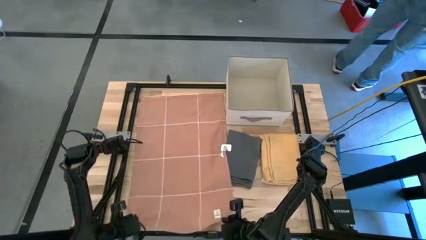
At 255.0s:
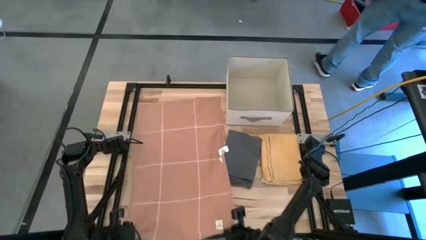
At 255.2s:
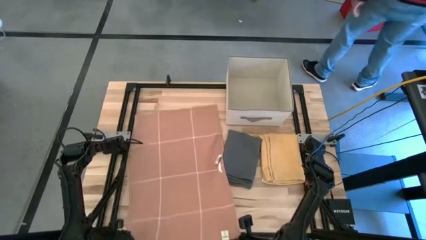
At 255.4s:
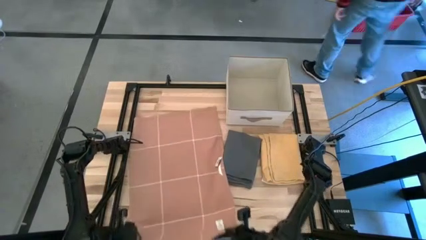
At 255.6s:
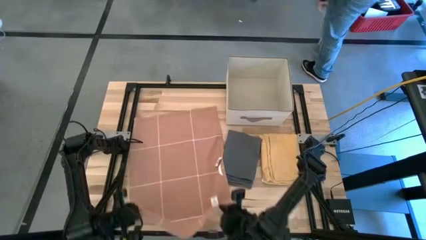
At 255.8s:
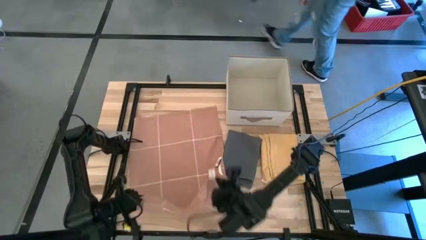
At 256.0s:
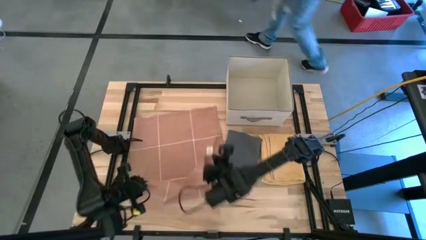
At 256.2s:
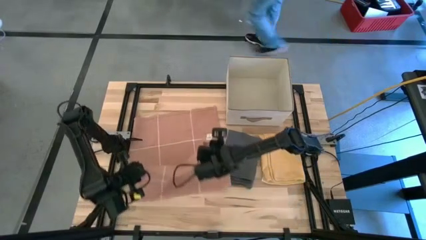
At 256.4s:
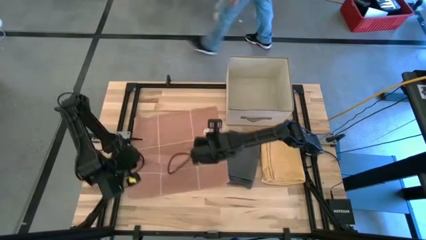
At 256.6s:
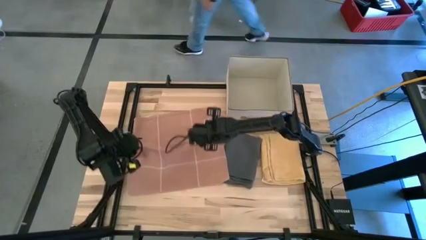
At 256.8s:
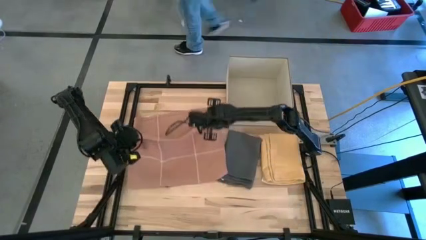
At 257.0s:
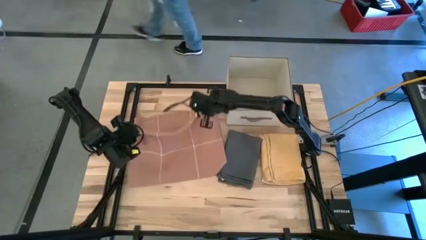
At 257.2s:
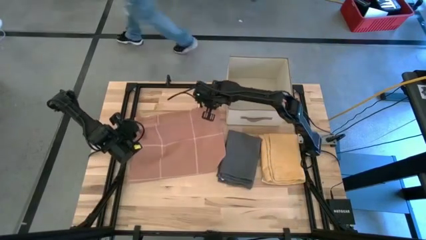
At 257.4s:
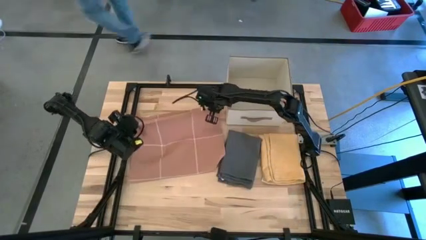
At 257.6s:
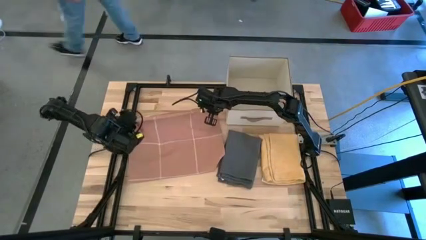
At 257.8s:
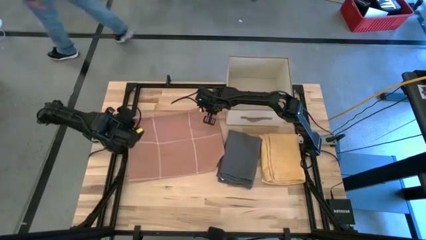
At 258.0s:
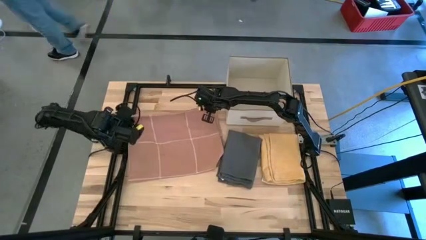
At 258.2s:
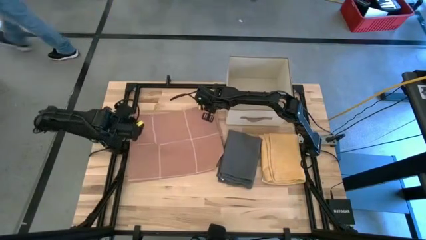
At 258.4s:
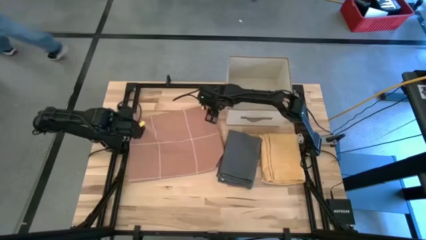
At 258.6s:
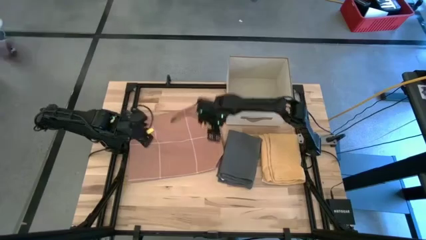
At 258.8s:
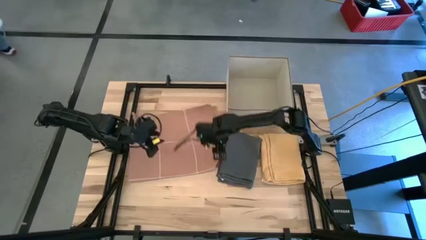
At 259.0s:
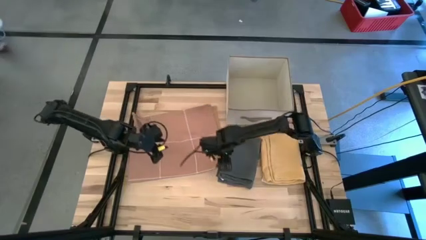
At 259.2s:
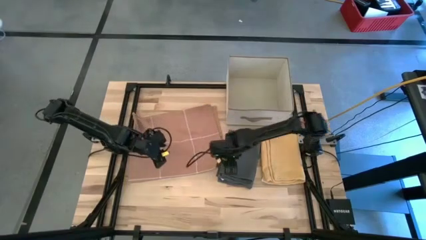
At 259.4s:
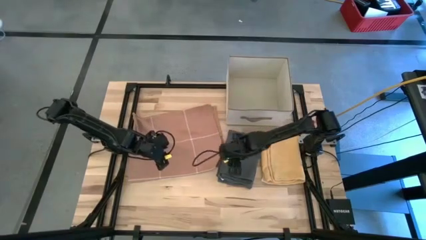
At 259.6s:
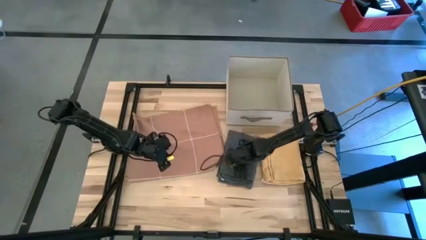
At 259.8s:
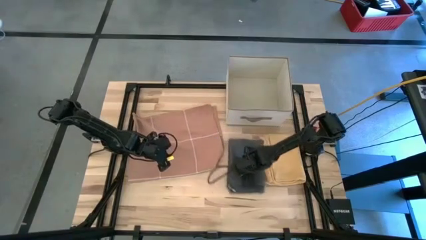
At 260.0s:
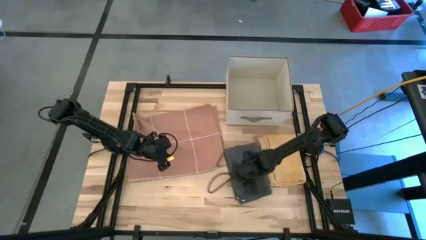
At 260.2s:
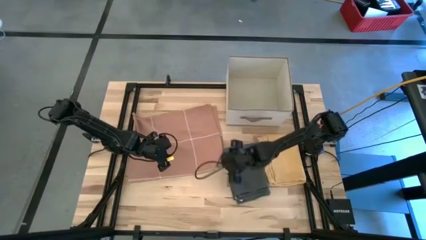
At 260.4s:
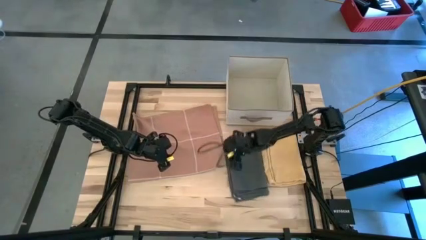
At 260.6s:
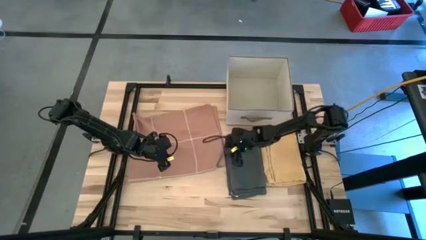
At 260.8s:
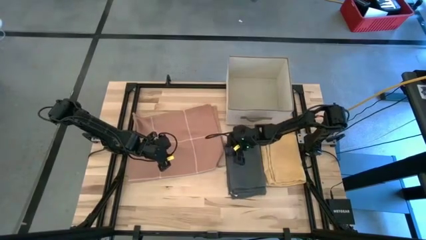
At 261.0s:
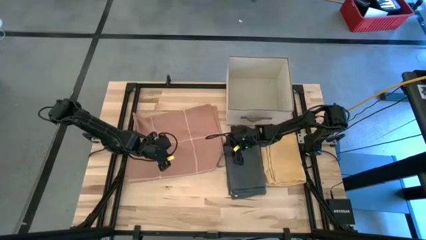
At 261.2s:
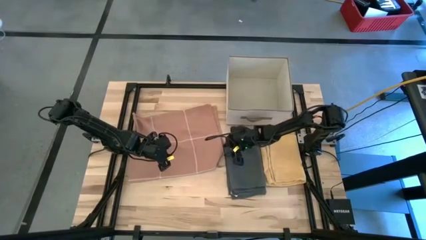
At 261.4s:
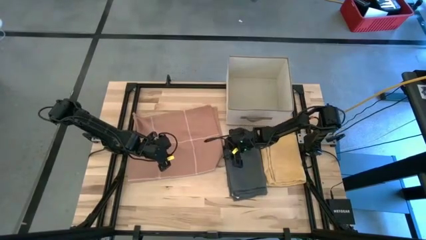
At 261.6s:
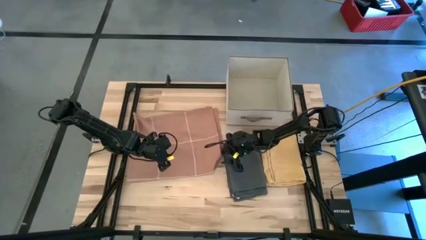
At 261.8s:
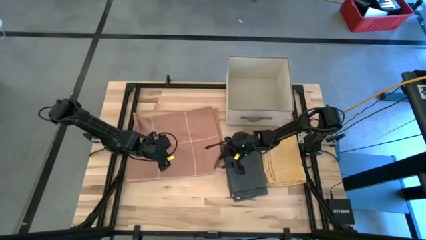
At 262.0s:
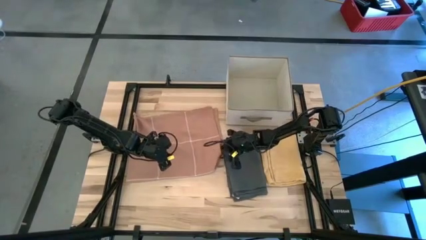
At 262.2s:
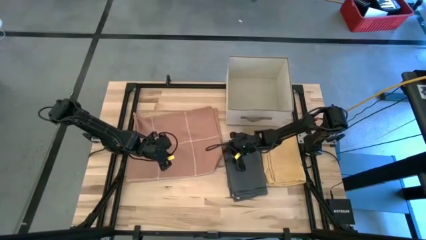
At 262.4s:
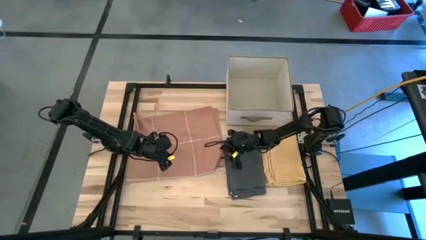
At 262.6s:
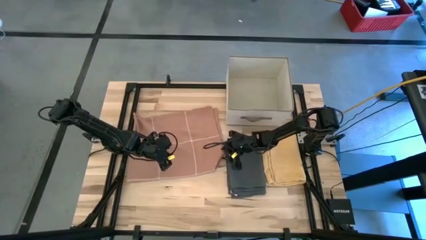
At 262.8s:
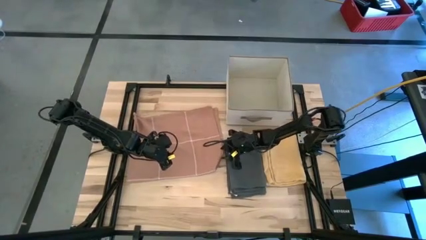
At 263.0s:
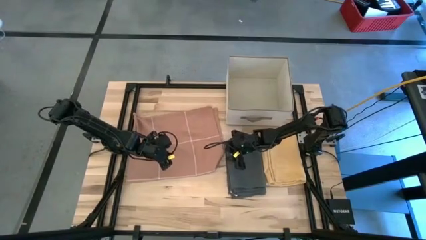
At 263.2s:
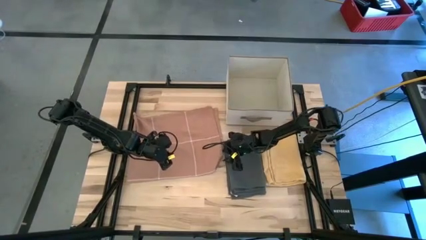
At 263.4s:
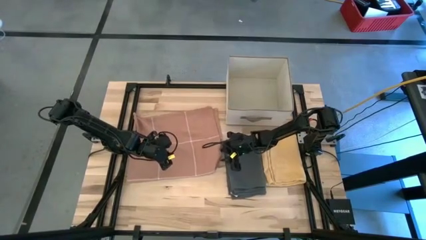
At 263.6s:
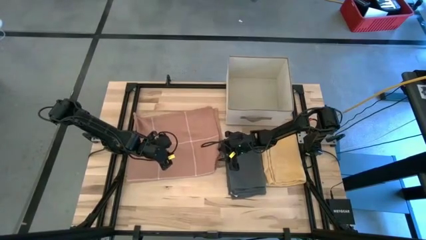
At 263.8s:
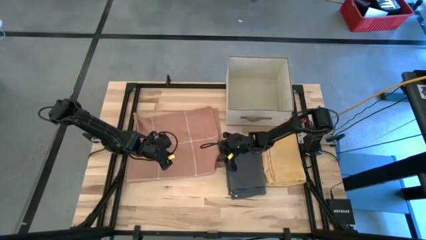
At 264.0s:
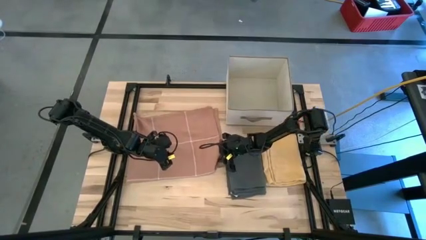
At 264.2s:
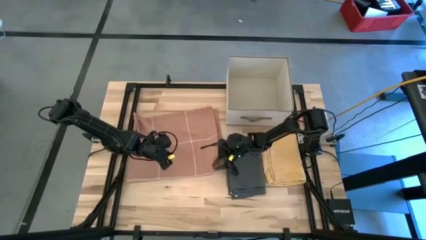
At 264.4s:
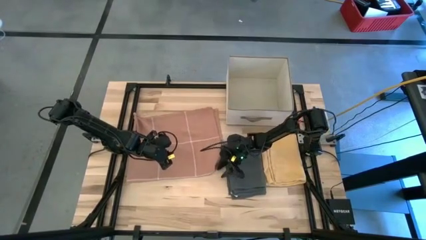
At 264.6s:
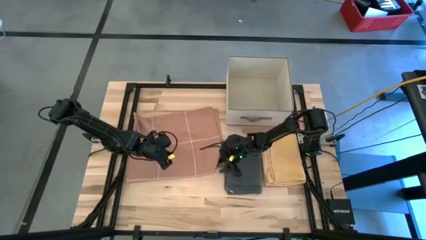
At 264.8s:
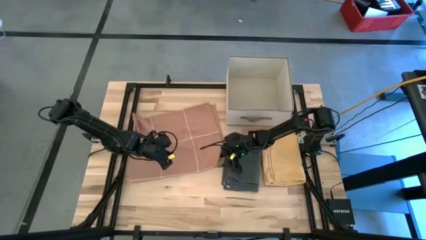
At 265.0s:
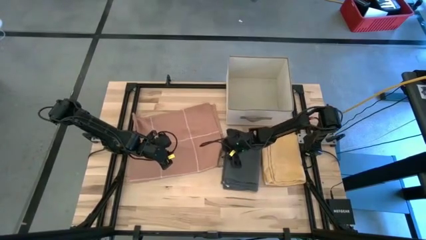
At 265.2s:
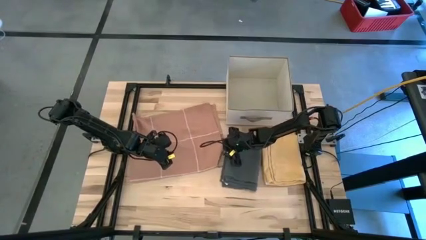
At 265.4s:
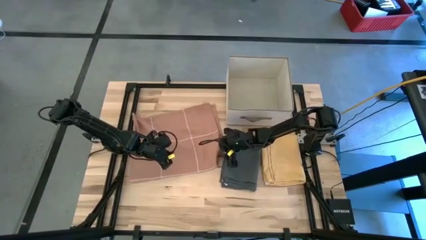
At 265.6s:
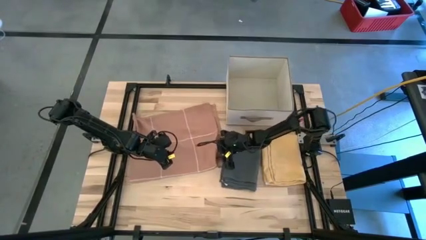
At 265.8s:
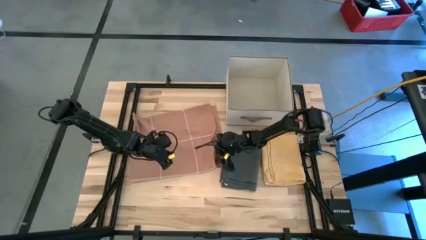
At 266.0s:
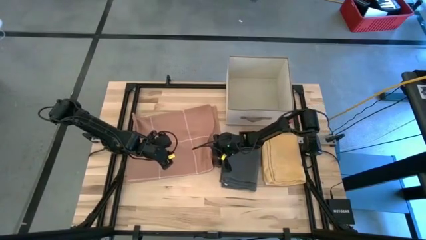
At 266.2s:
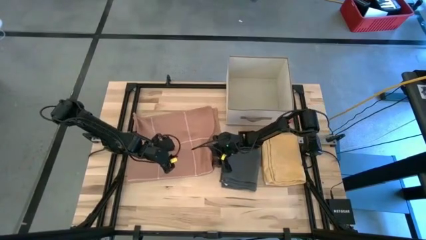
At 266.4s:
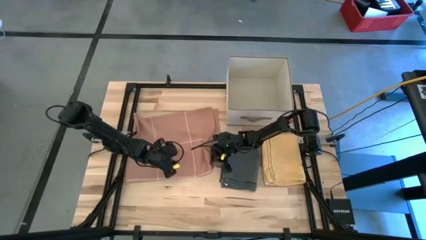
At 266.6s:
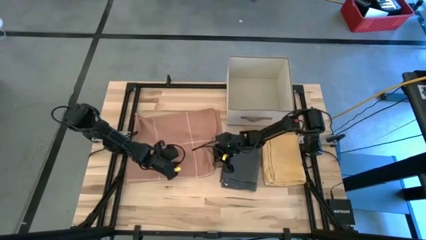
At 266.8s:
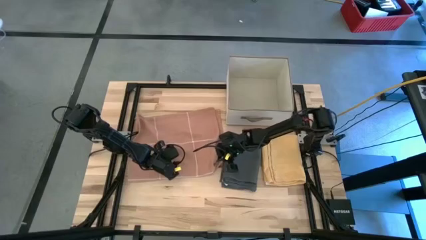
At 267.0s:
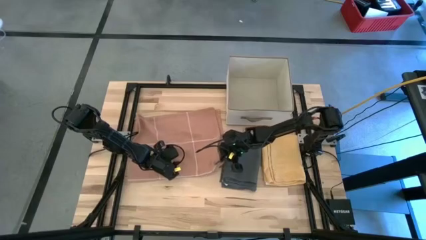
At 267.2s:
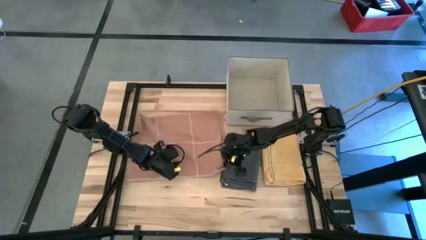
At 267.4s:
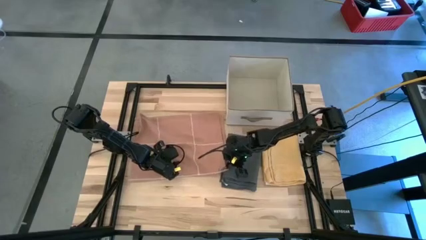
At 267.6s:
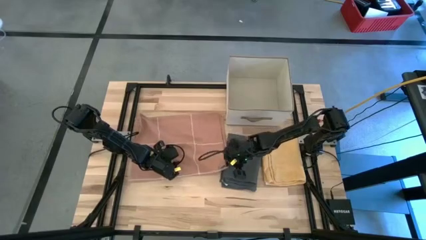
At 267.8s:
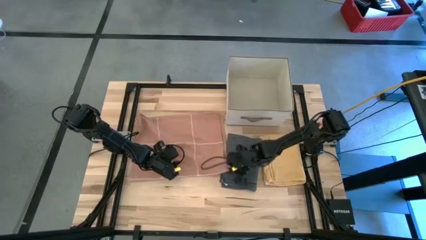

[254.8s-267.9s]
Task: Fold towel
Fold the brown towel

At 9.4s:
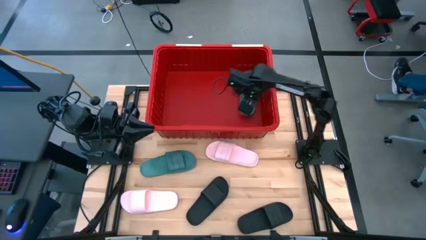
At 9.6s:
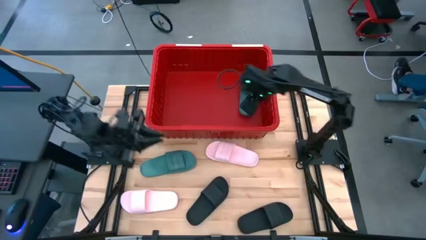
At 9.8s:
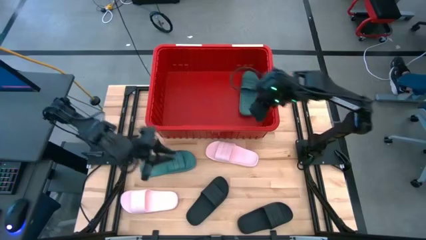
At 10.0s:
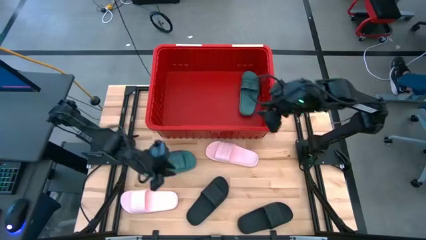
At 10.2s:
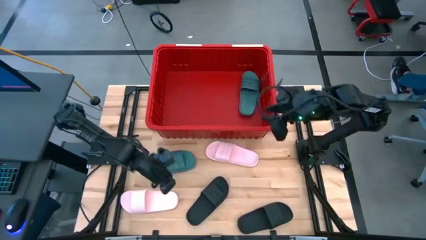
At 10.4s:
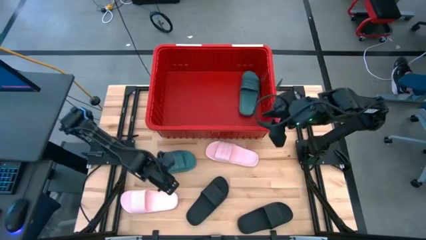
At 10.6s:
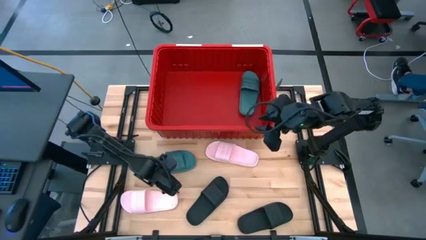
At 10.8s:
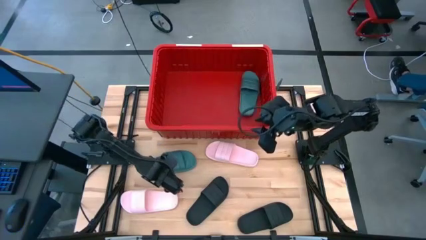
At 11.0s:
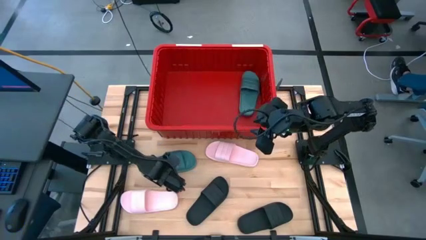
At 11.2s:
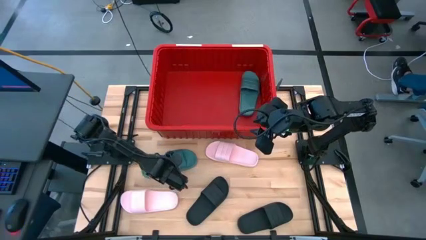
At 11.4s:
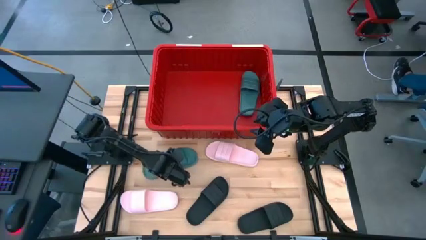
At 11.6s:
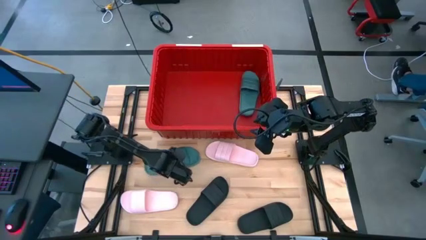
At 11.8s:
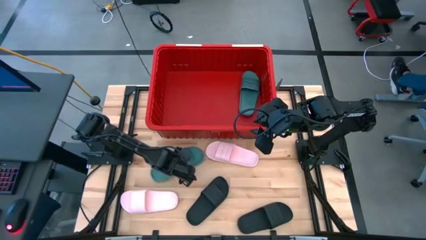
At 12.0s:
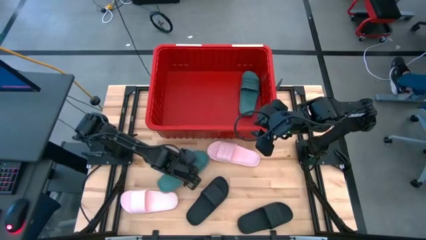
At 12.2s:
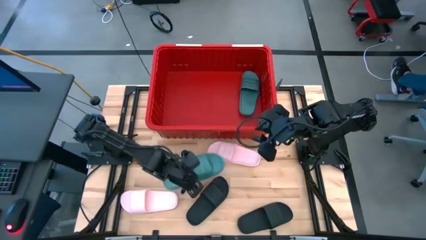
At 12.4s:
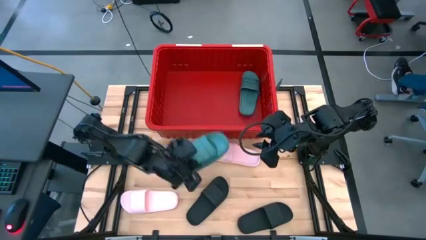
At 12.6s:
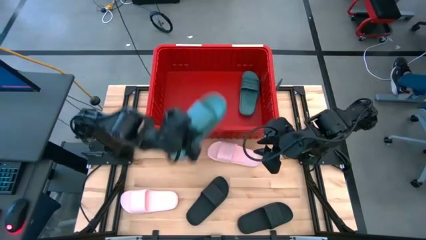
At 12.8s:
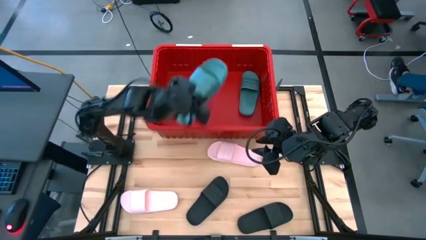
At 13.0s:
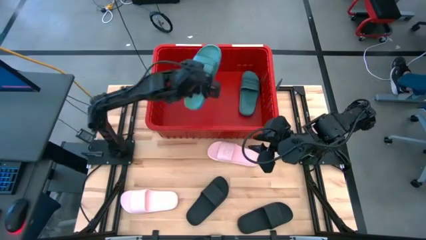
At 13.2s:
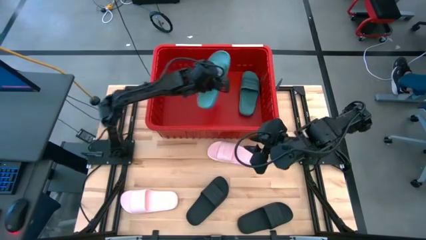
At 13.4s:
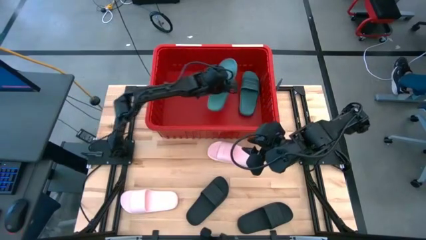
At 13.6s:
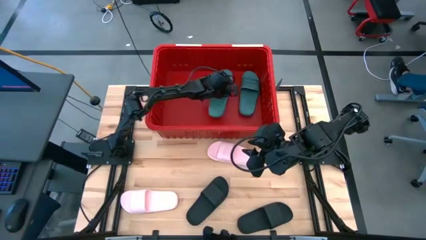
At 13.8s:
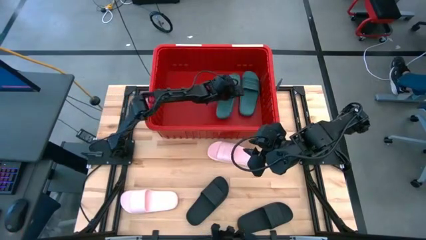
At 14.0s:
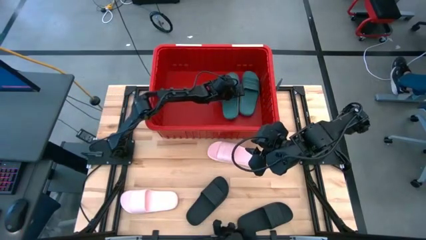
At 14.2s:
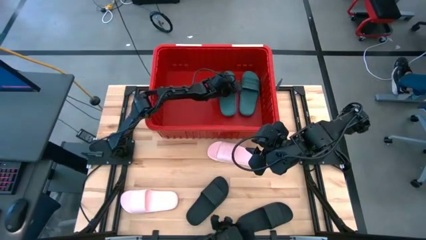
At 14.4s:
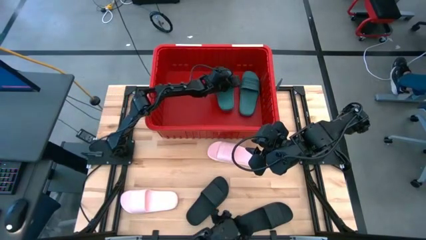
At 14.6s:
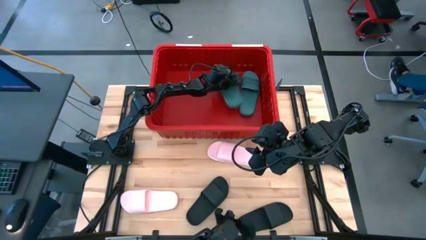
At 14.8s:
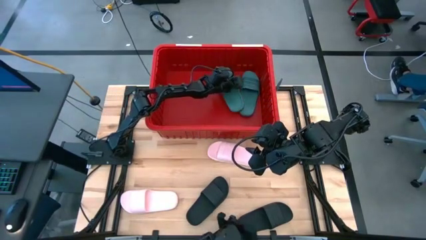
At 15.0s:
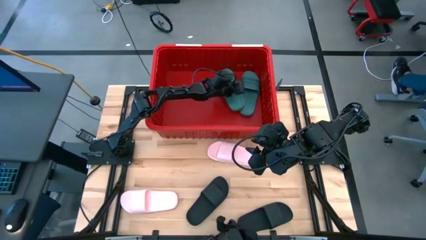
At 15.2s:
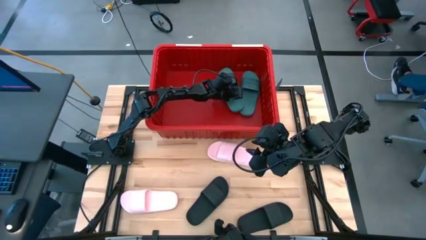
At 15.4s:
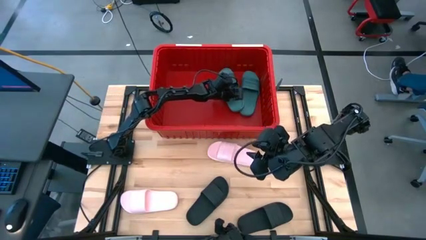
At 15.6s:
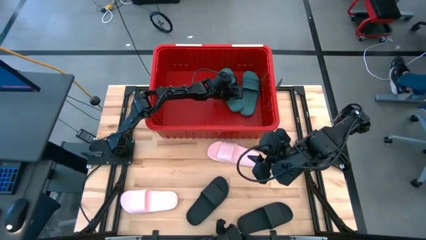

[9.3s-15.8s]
Task: Pick and place slides into bin
Put the blue slide into the red bin
